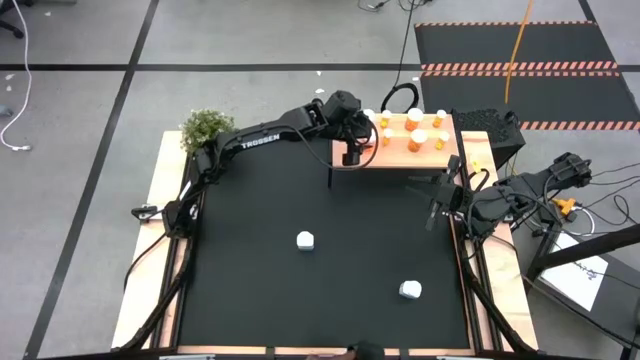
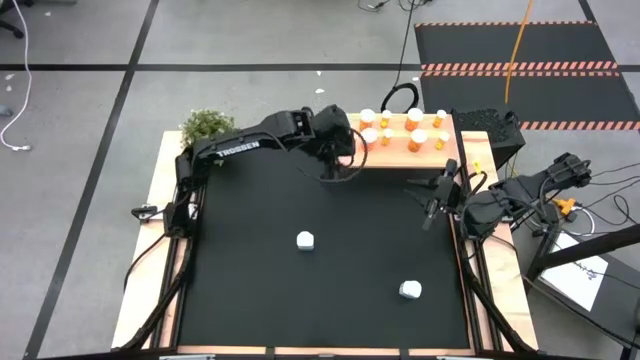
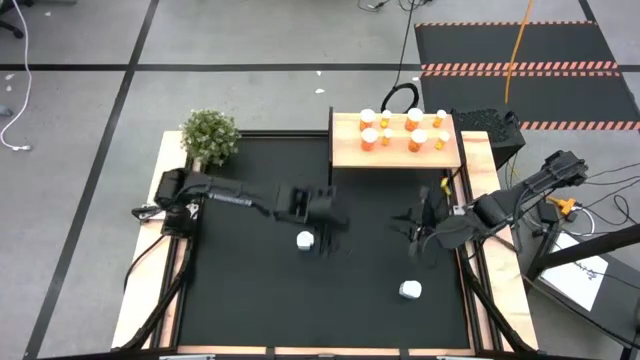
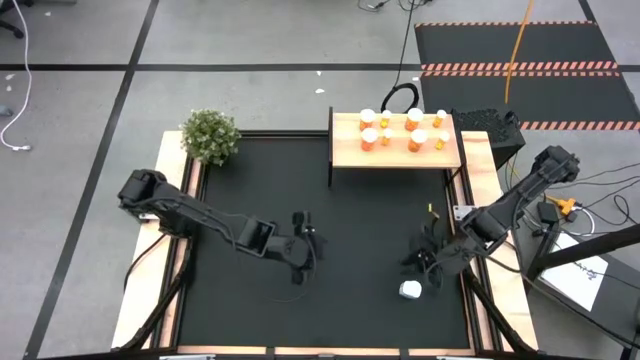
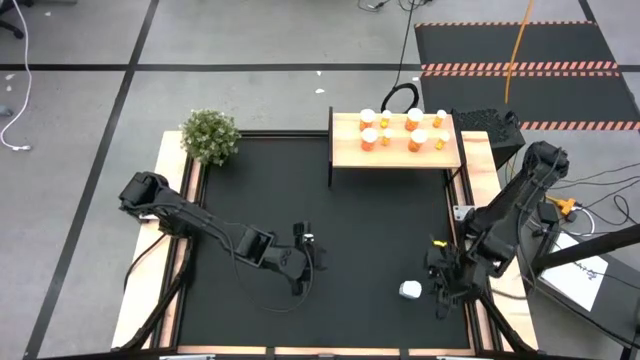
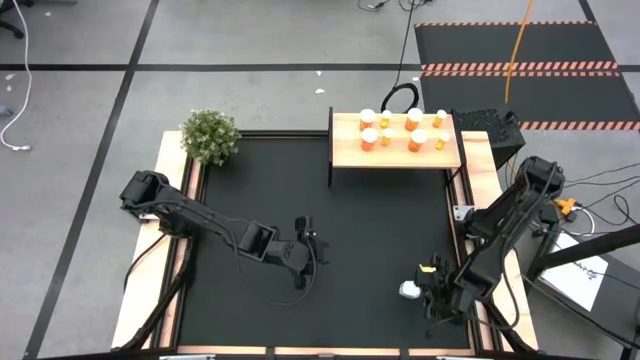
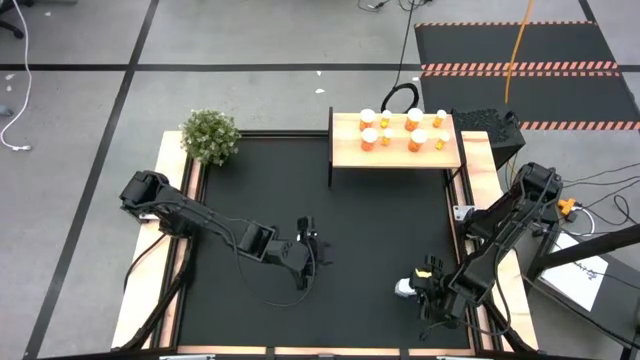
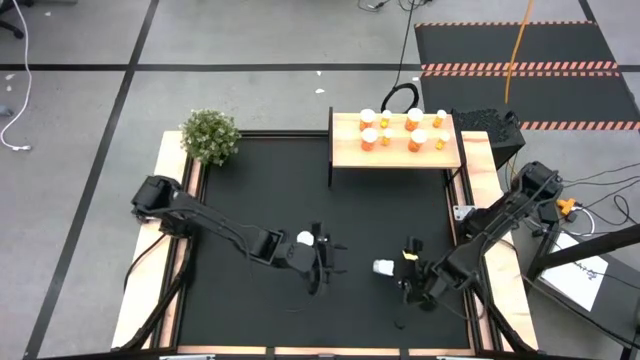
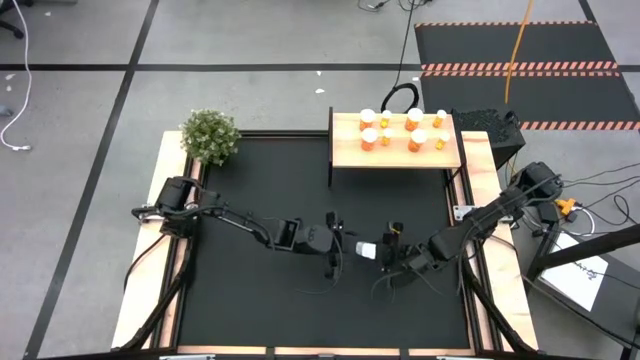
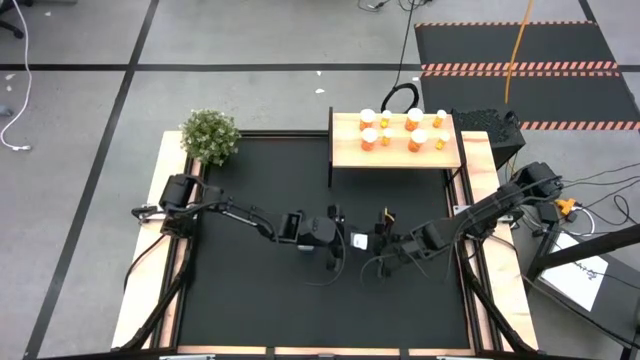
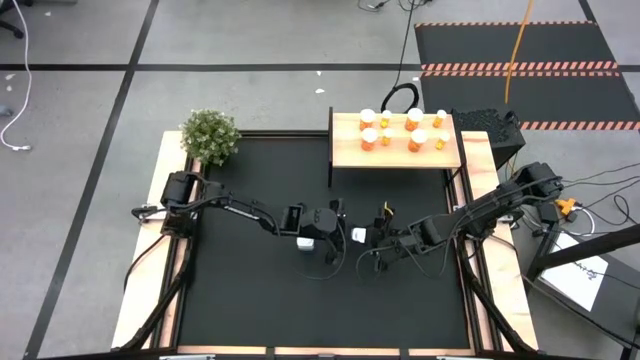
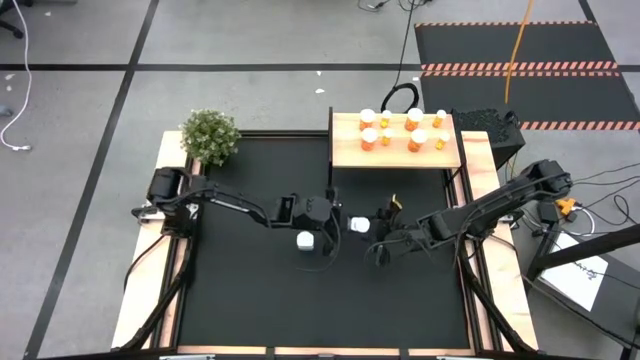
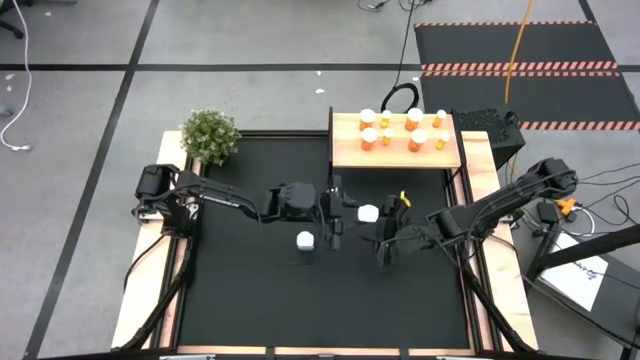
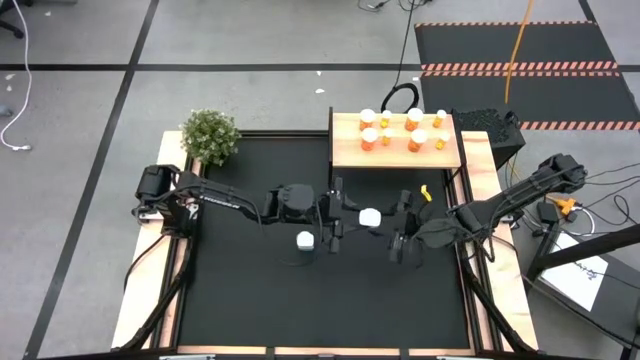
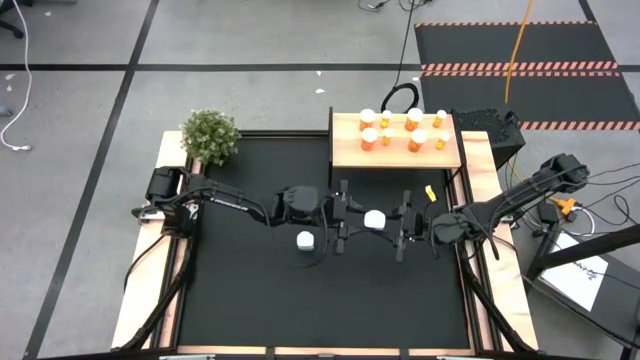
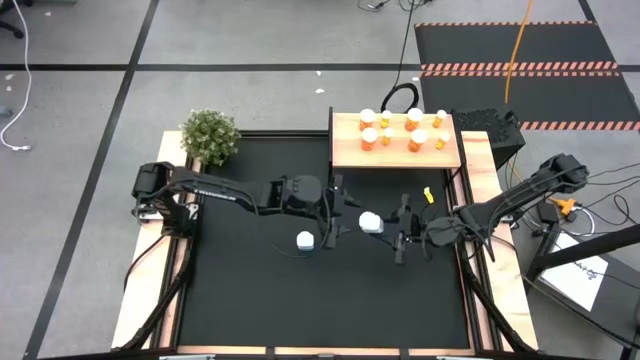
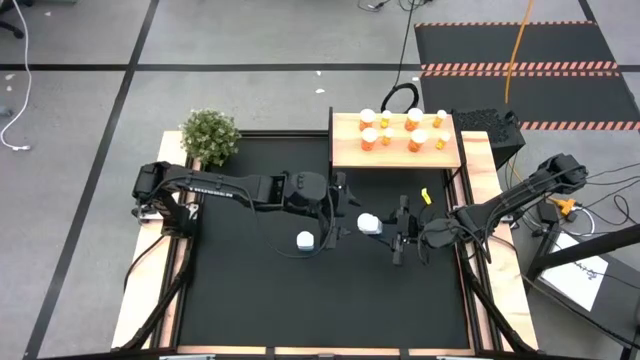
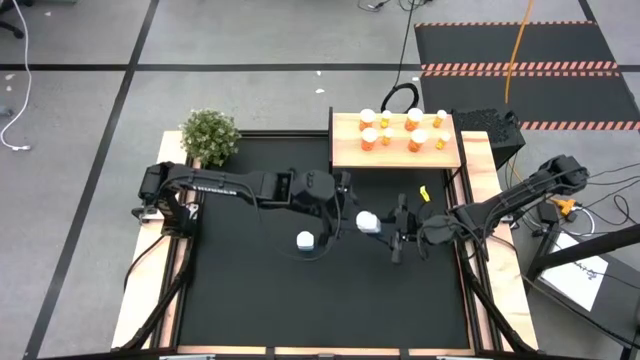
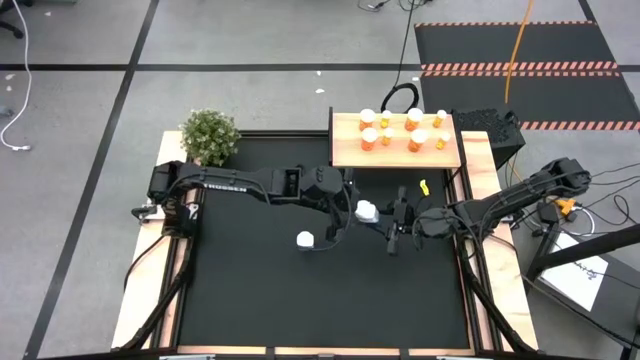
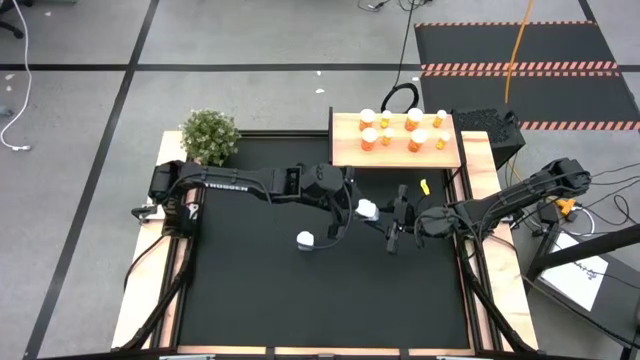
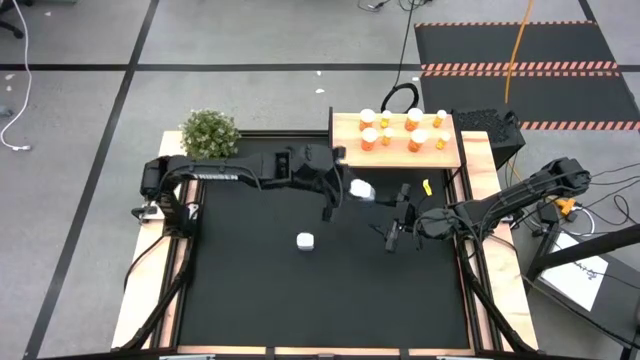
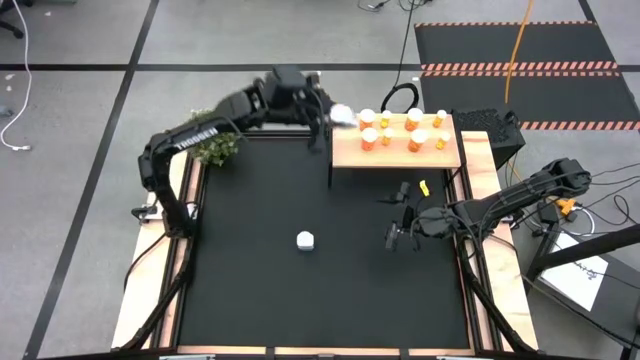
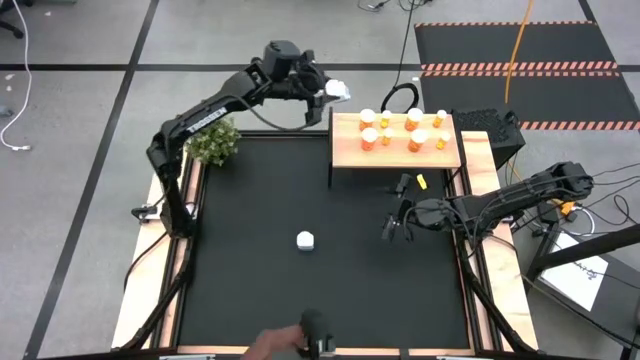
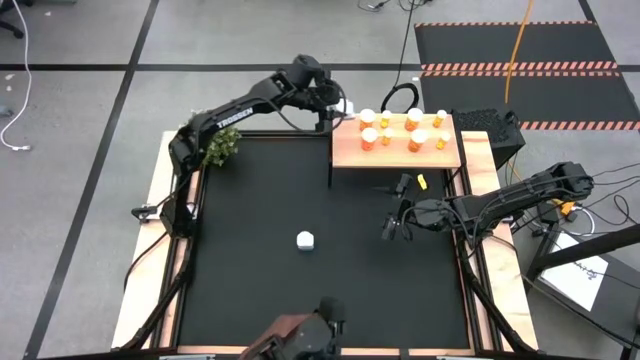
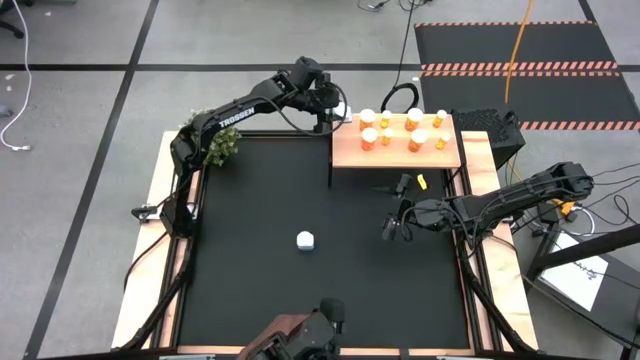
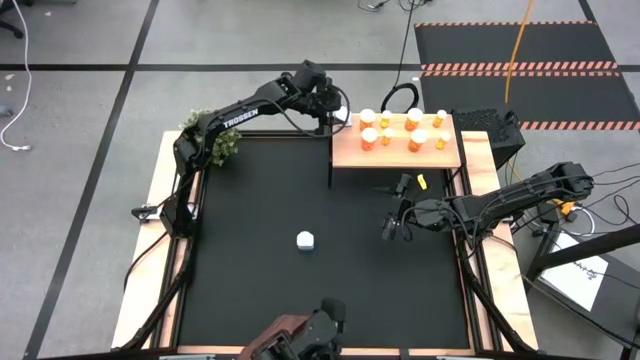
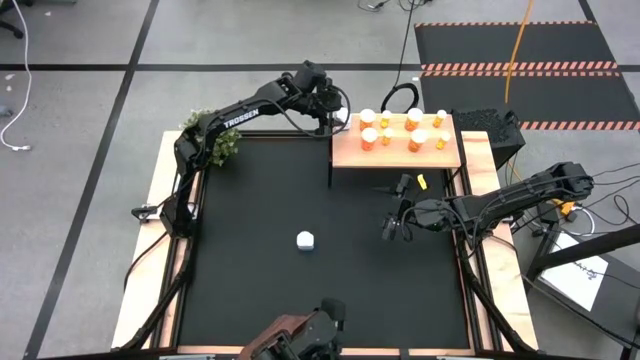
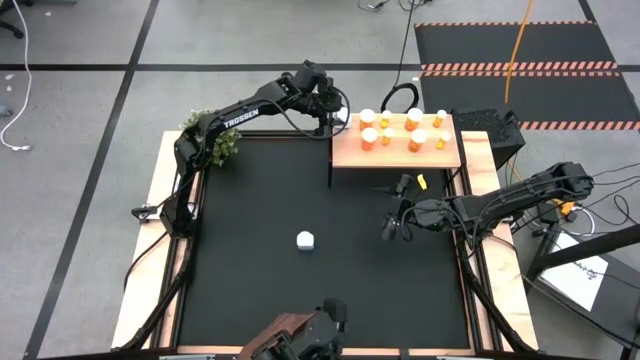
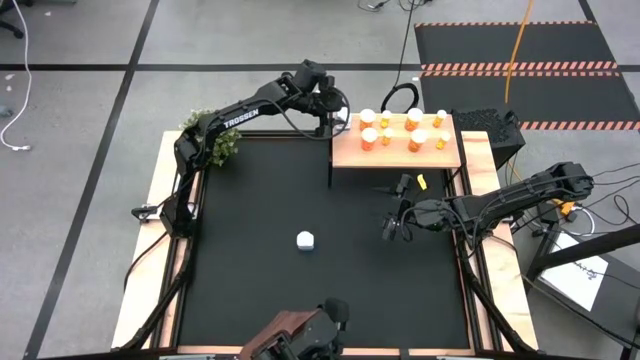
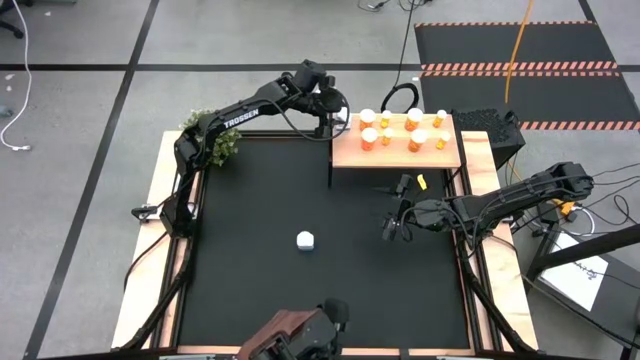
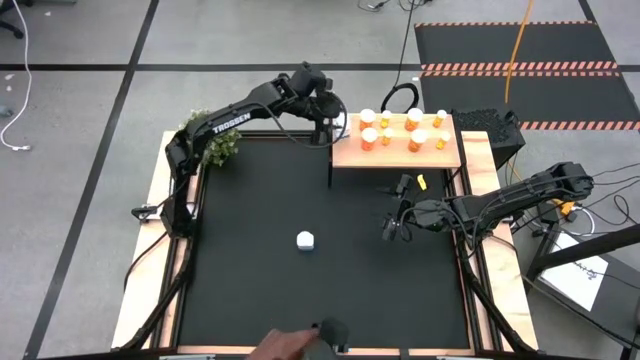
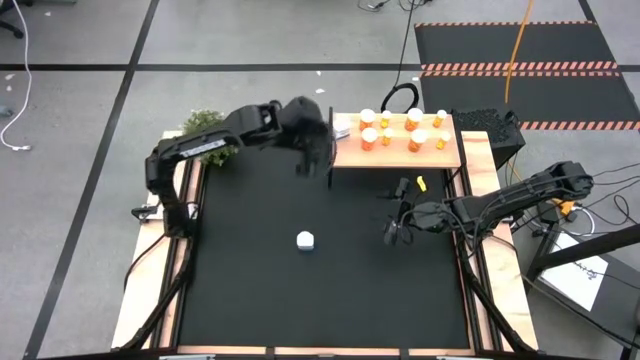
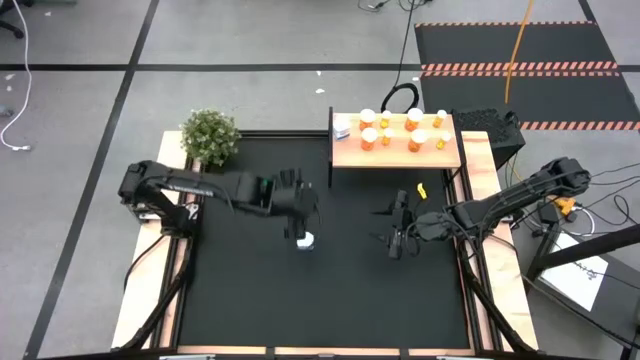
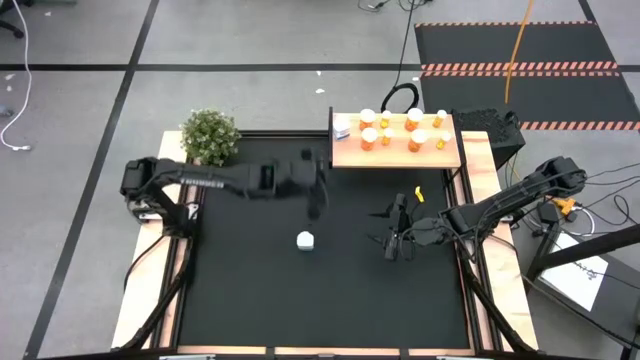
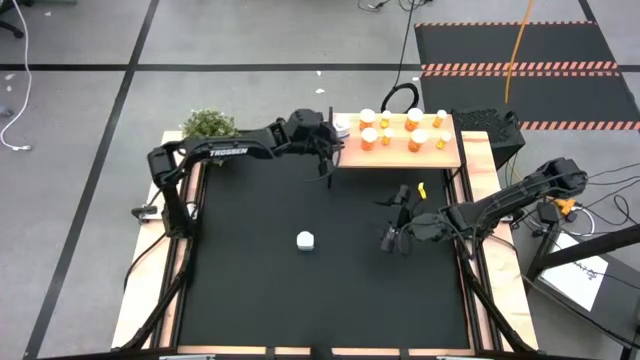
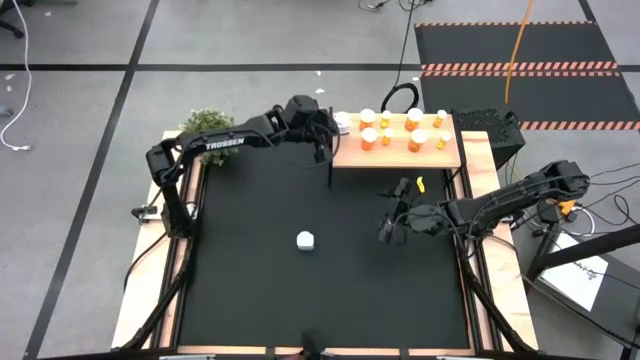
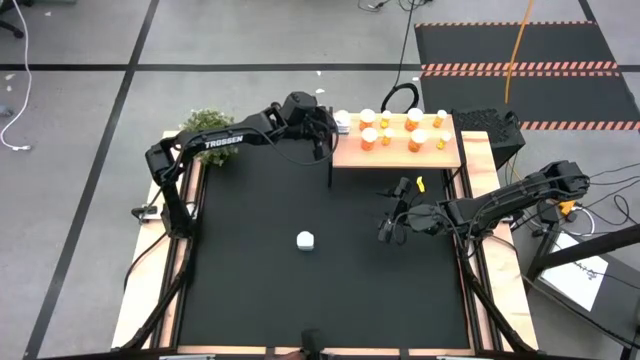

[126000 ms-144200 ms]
Task: Pick and place medicine bottles onto shelf by color
Put the right large white pill bottle on the shelf
